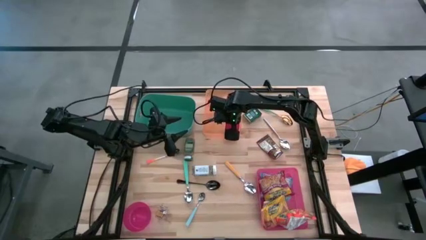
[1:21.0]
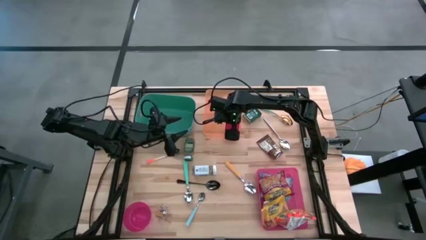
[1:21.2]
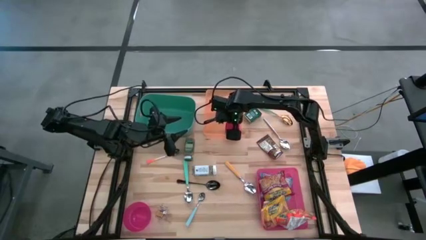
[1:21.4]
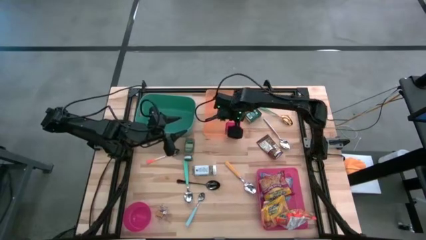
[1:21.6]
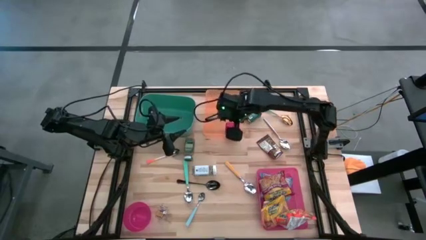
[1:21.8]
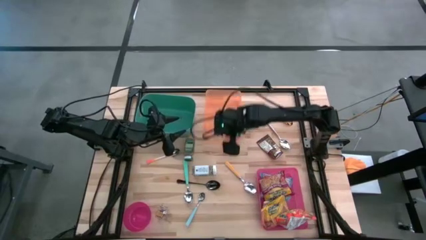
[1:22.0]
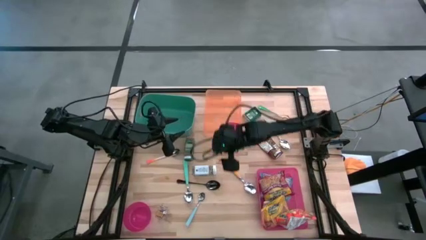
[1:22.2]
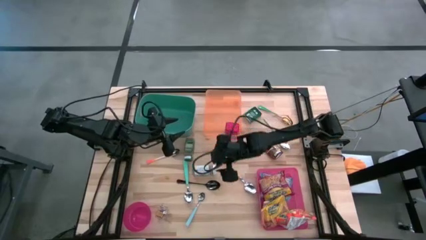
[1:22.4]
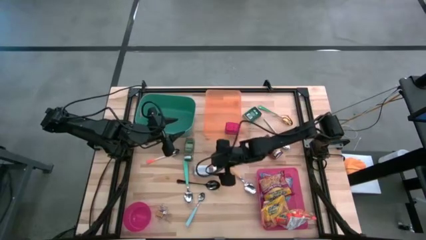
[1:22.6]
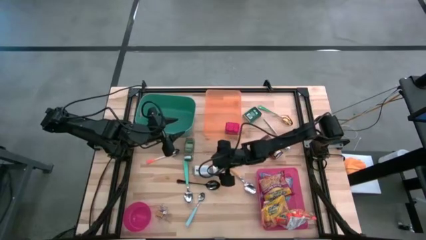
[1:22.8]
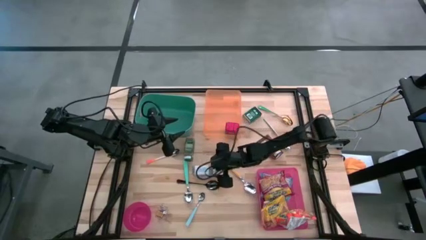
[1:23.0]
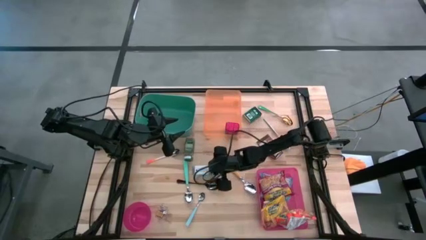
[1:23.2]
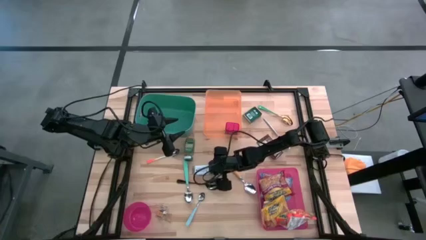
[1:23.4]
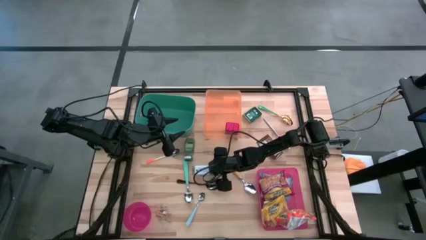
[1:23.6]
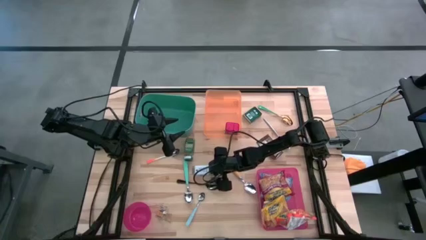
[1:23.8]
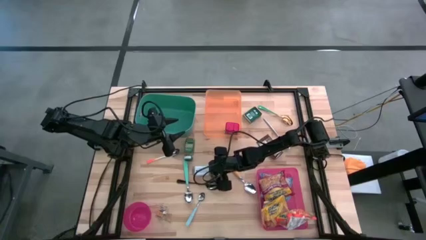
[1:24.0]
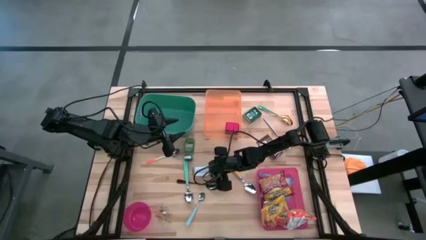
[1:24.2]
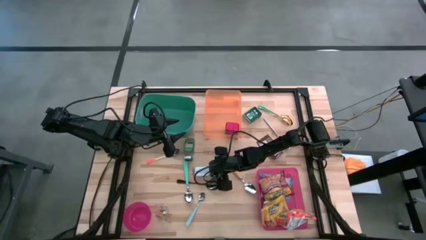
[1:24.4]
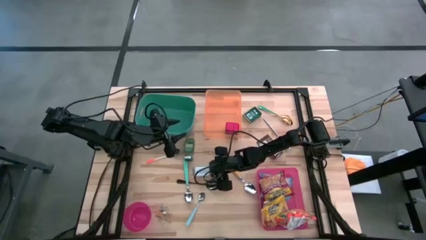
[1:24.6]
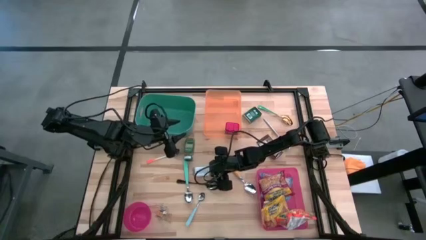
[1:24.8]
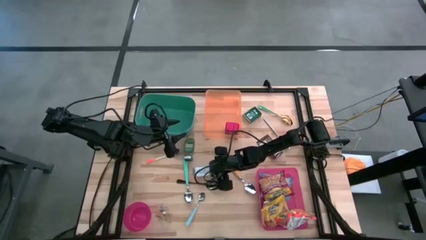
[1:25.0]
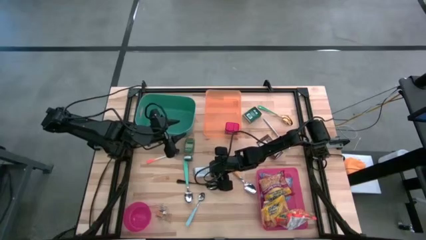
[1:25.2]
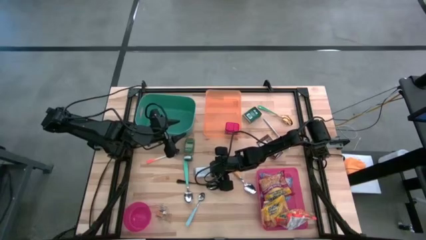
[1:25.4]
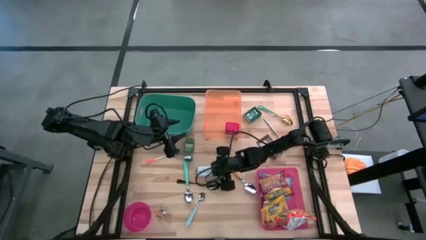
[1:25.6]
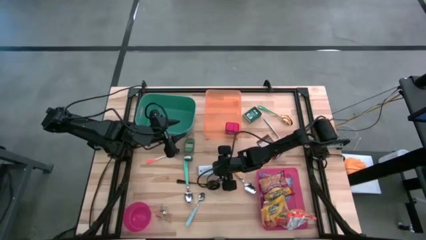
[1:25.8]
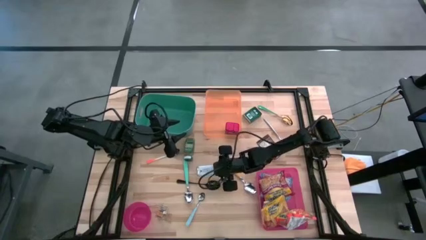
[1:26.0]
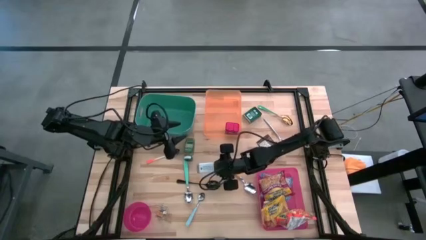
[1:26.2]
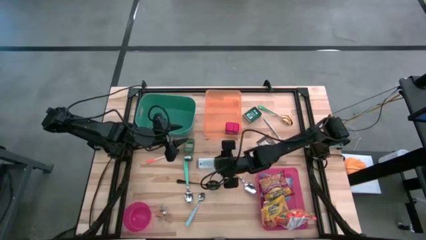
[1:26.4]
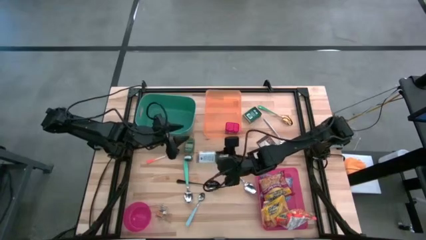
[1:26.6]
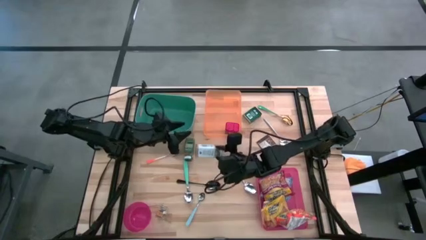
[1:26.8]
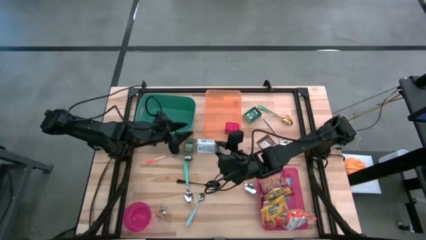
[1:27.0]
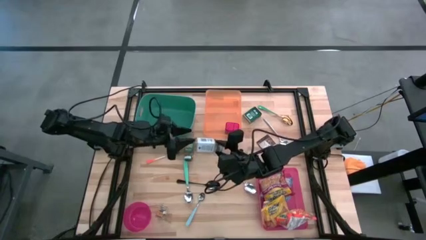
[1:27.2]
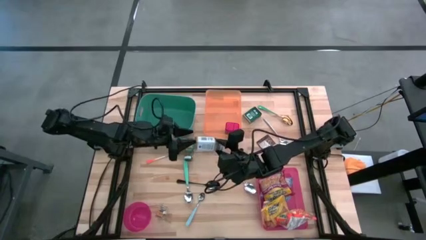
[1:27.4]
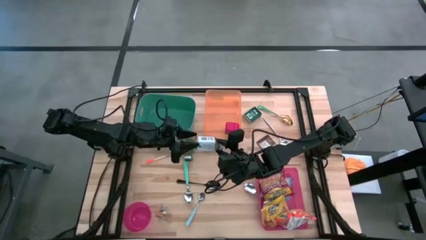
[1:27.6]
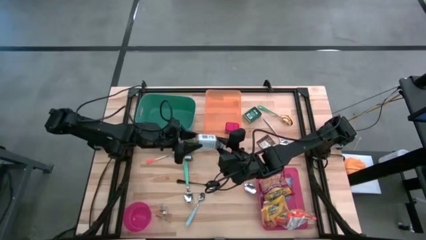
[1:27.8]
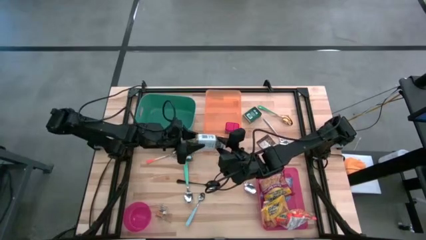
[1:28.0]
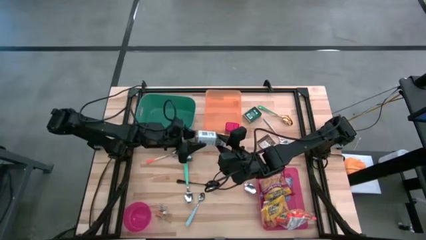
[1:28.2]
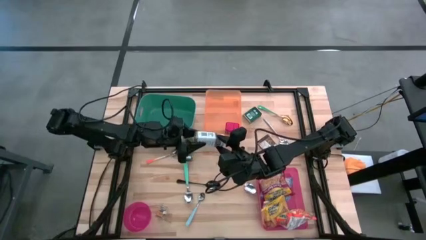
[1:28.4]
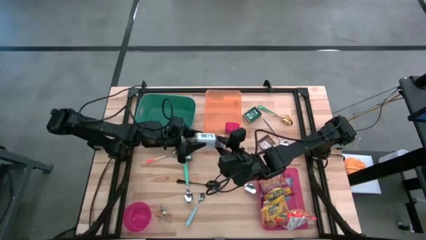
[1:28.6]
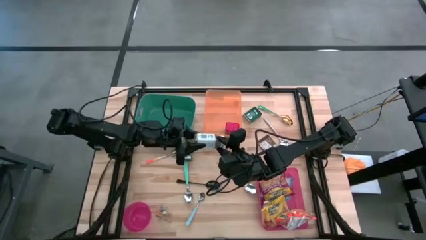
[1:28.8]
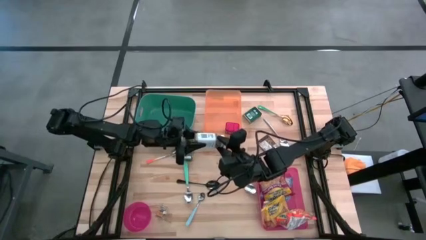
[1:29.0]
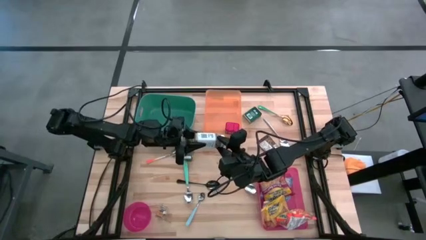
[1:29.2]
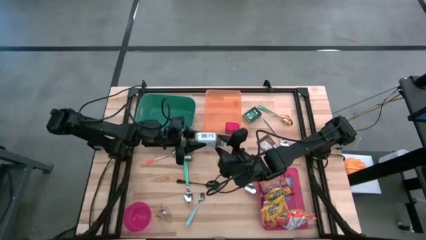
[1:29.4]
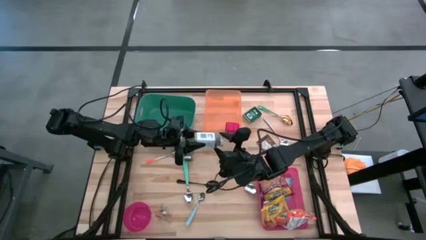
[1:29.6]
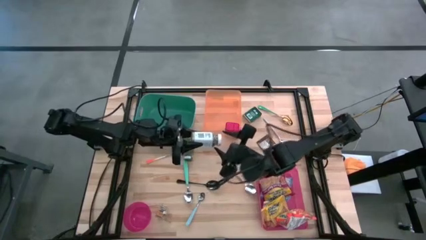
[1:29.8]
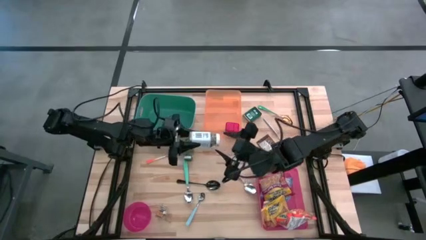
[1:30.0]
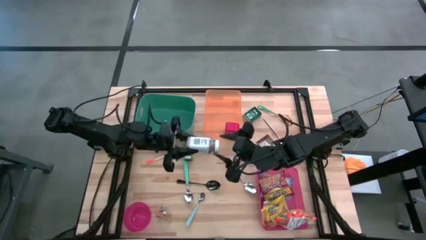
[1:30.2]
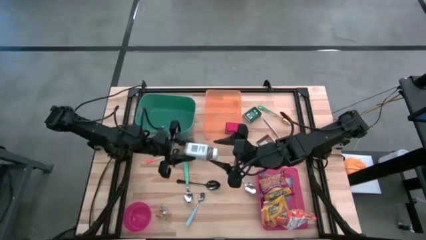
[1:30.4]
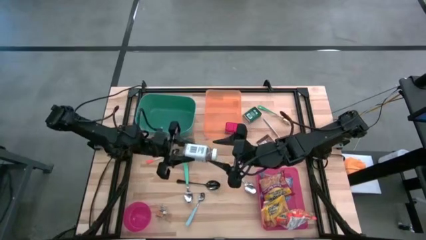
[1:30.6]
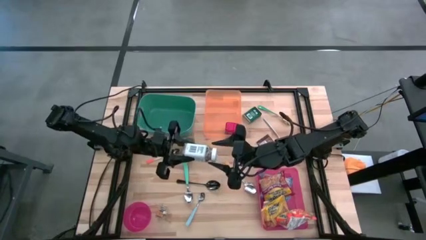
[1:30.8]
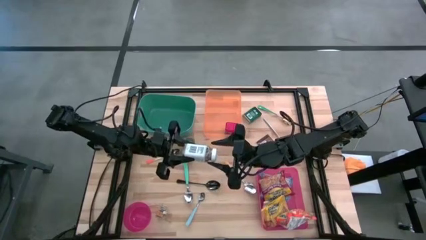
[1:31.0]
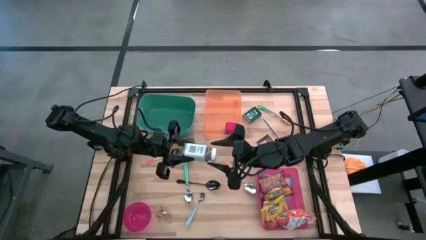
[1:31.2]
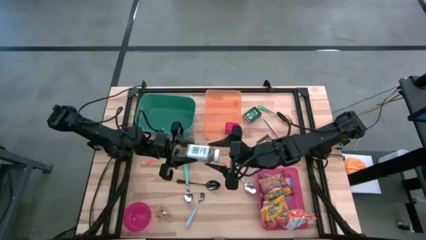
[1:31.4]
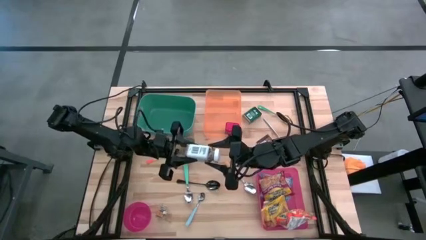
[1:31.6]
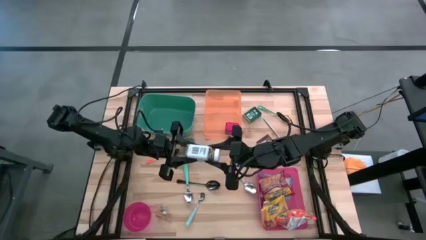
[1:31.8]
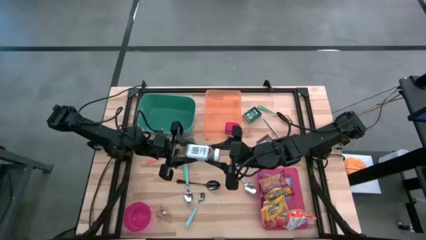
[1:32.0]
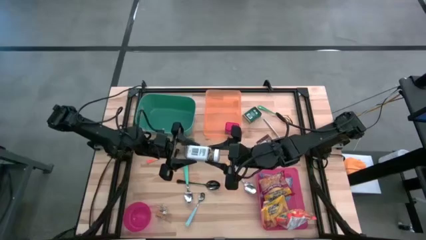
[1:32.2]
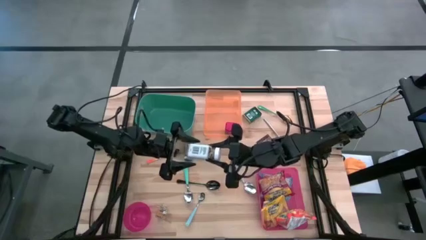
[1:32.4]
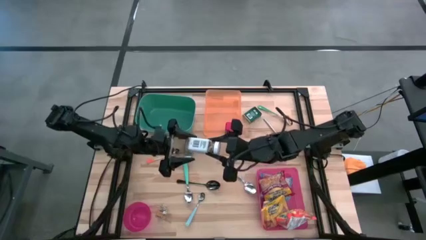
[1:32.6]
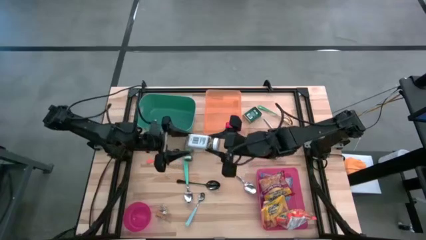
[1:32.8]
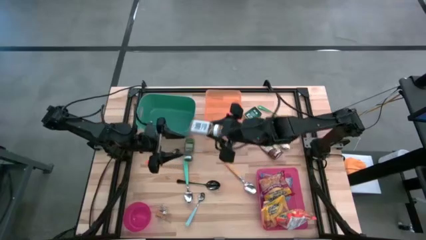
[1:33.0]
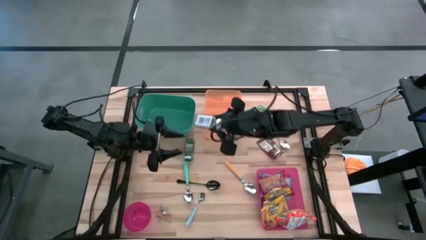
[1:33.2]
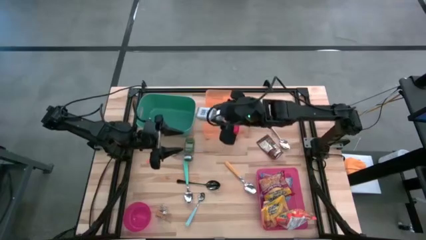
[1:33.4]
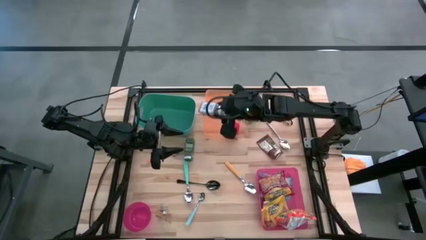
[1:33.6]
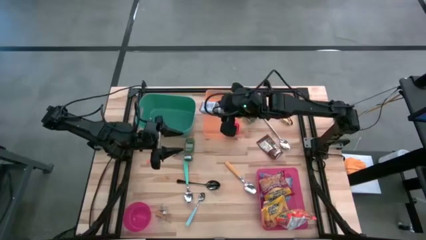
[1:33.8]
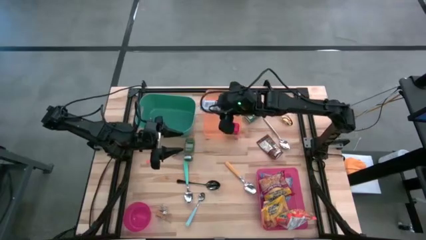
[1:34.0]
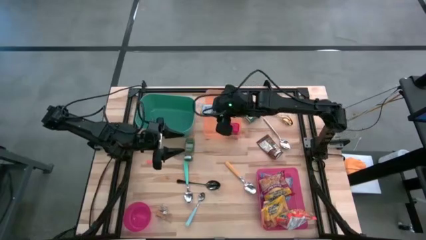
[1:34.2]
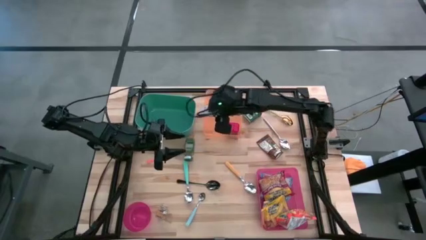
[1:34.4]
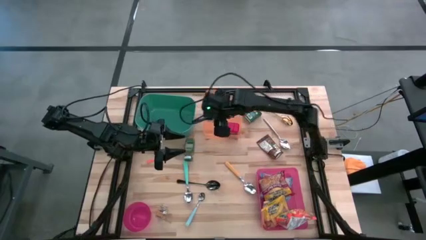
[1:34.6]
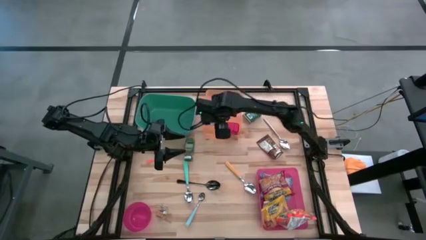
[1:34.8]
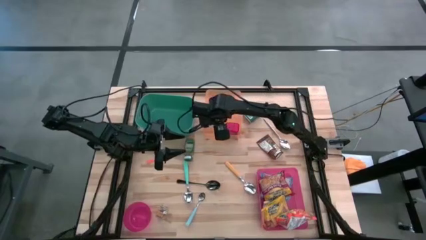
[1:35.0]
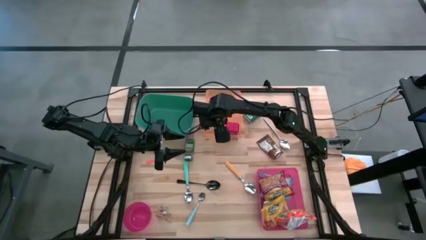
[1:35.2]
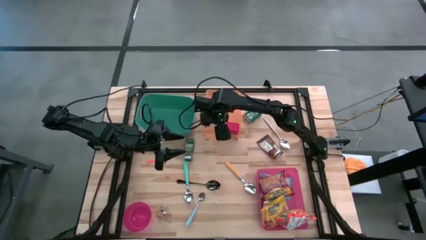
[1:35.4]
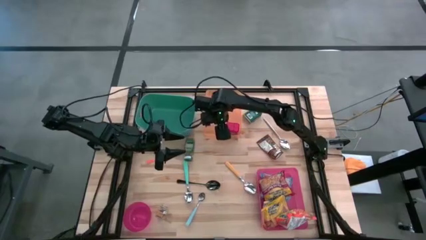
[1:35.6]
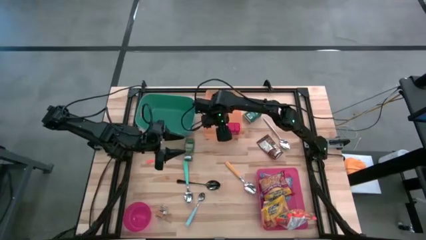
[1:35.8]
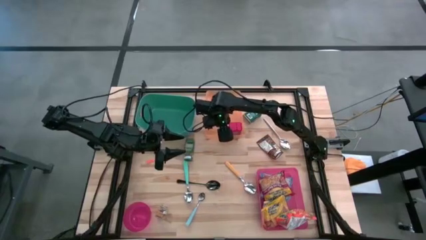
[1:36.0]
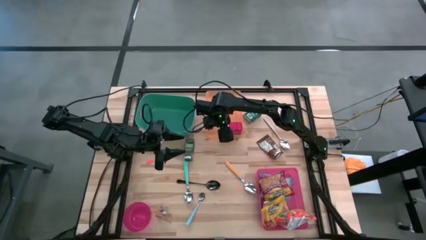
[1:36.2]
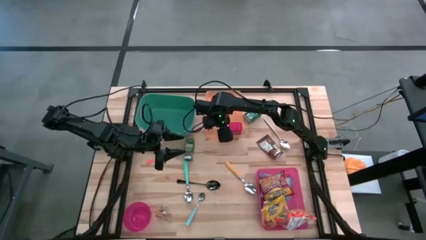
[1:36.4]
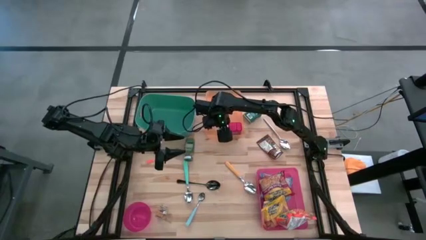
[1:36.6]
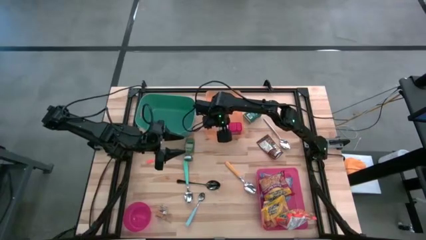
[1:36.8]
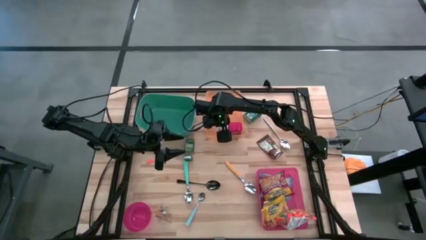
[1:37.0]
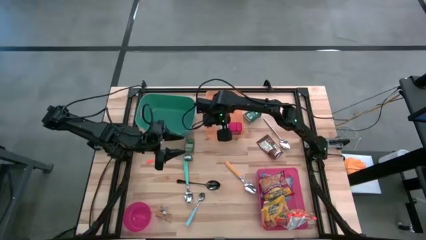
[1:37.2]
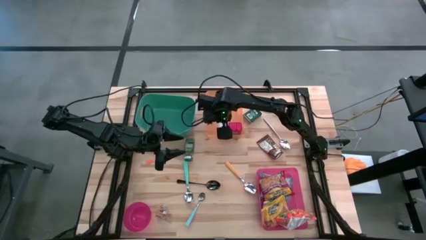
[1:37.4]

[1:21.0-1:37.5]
Put the white seasoning bottle into the orange bin
